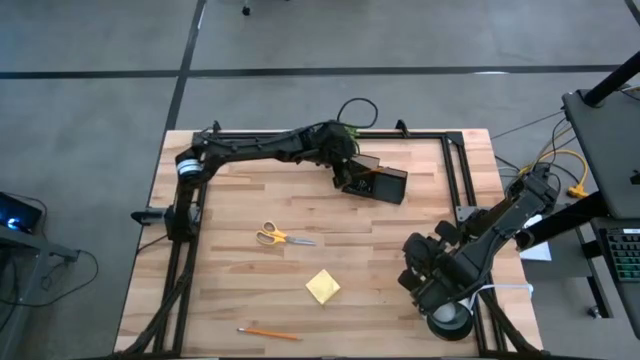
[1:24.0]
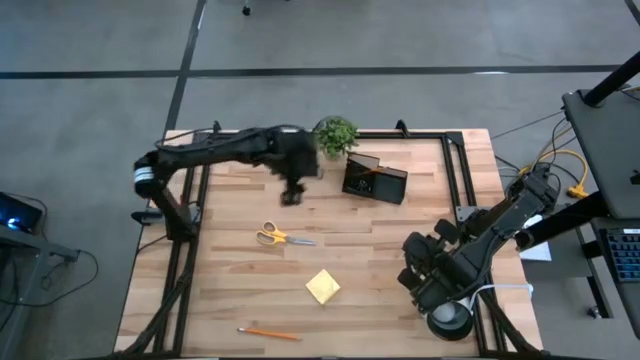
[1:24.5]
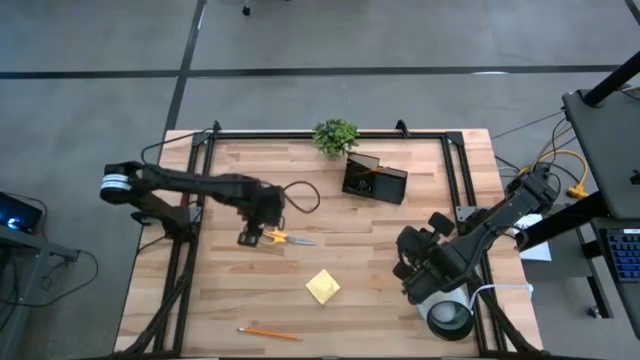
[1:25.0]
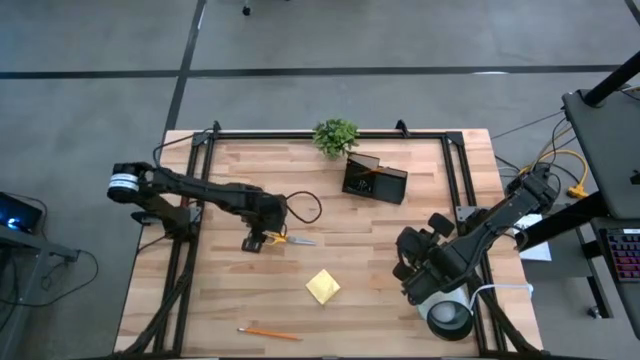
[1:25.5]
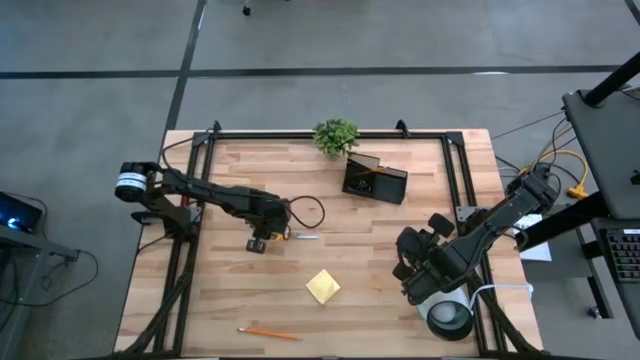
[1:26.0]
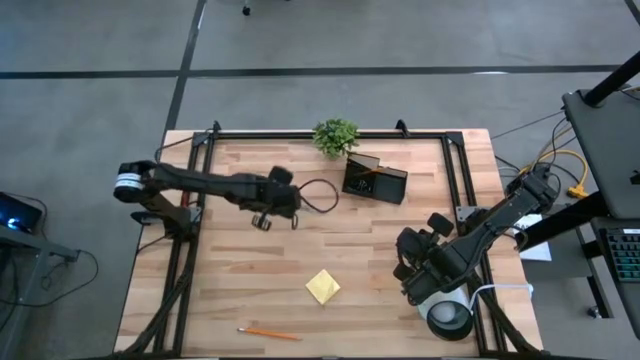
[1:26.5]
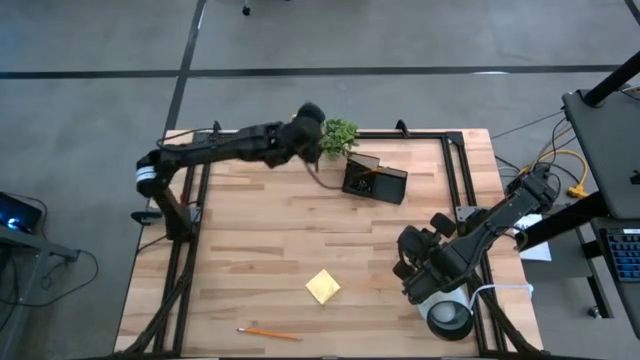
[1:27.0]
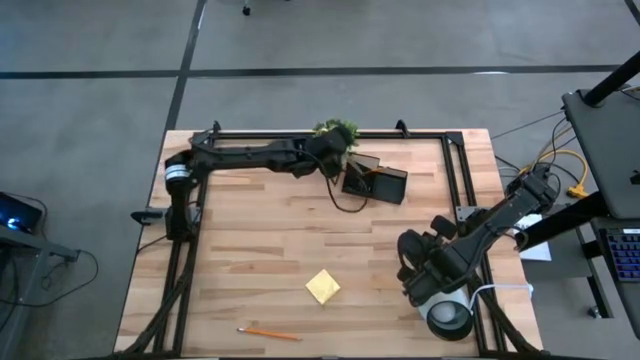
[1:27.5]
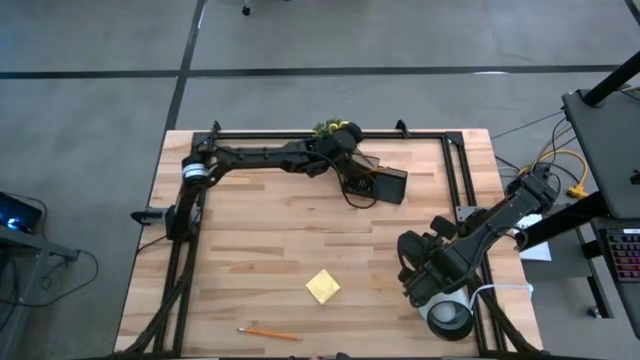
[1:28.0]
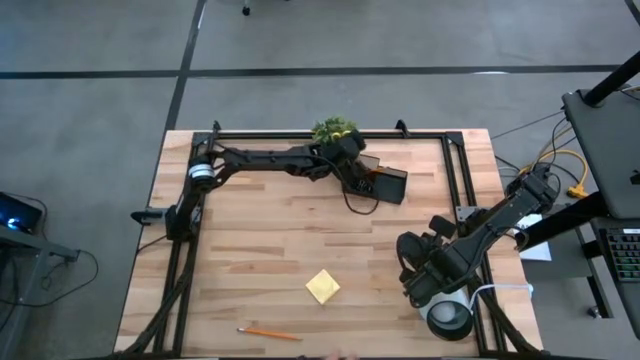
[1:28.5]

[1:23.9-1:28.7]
Task: Pick and place office supplies into organizer
Put the yellow scissors into the desk organizer

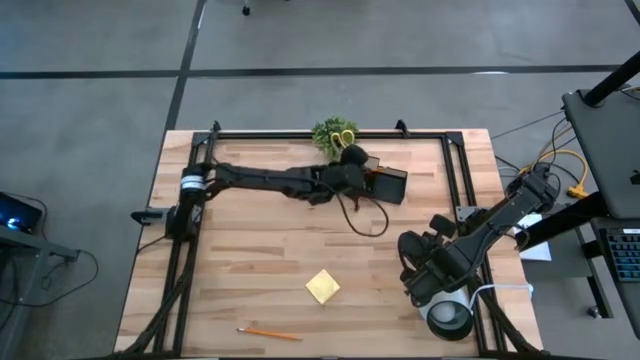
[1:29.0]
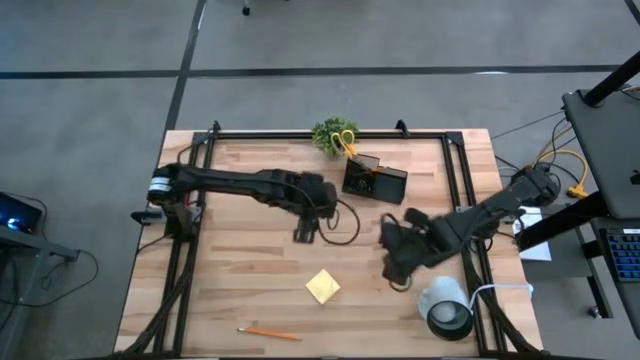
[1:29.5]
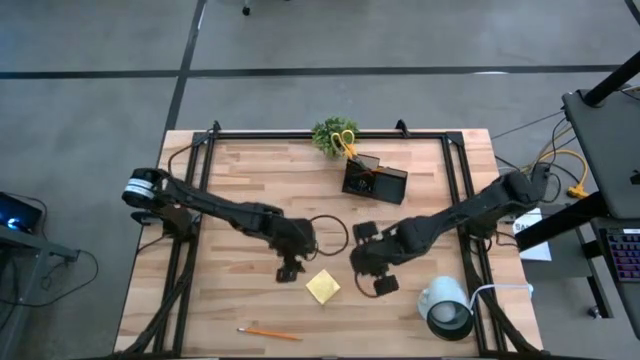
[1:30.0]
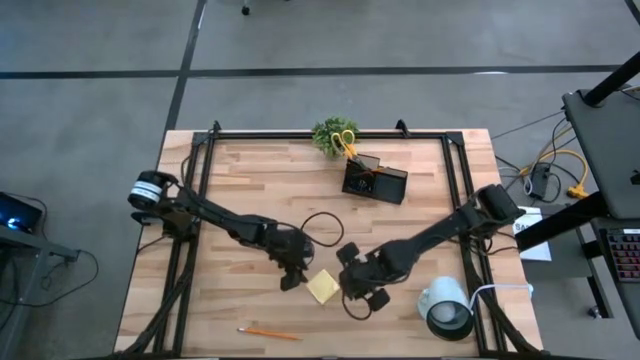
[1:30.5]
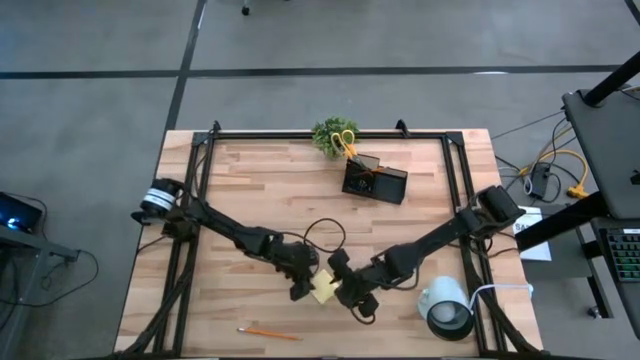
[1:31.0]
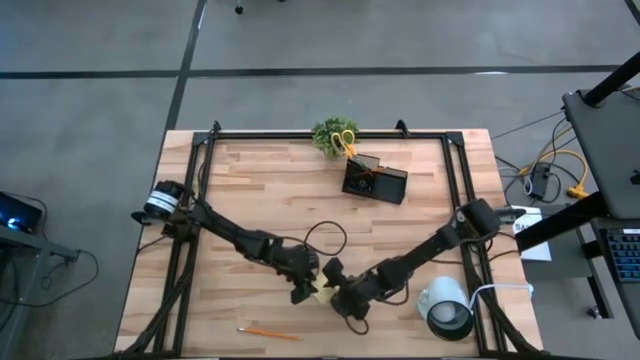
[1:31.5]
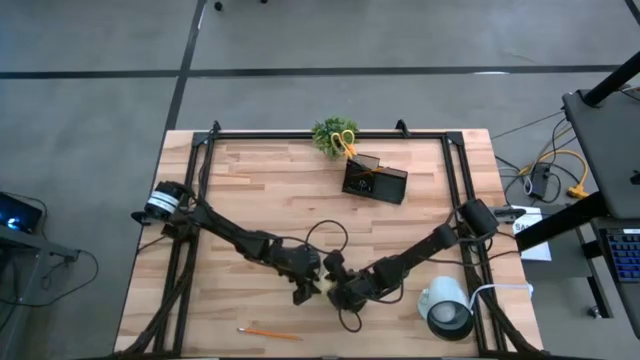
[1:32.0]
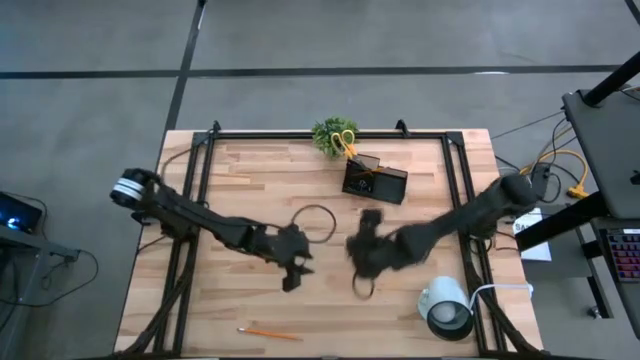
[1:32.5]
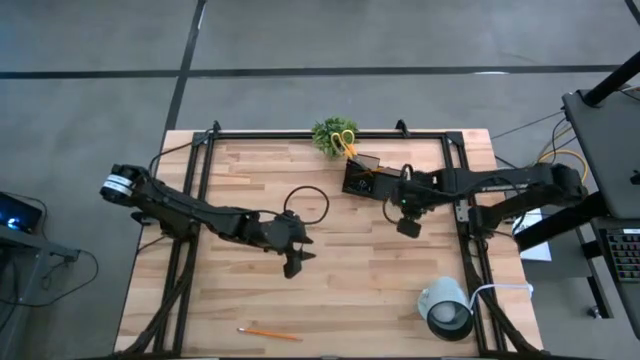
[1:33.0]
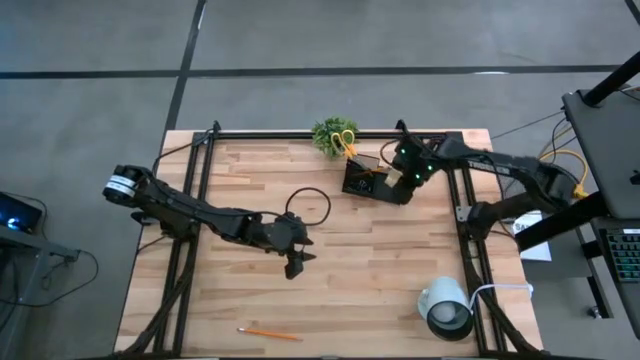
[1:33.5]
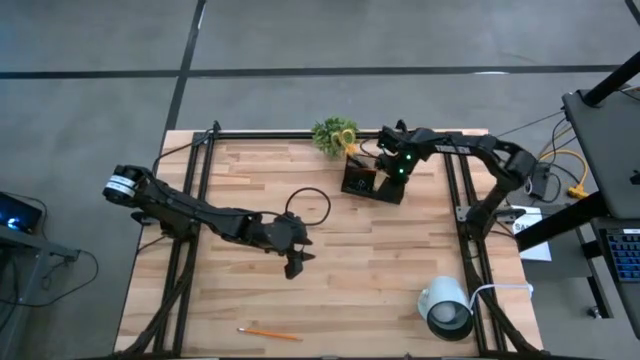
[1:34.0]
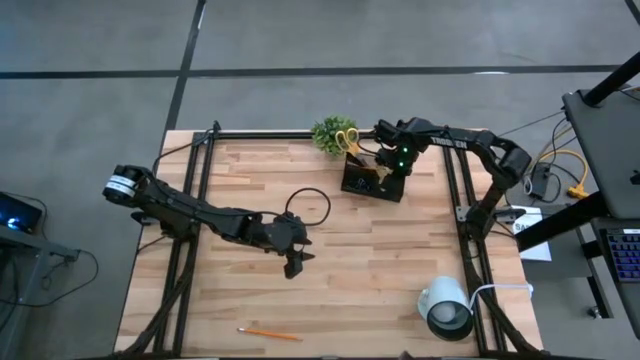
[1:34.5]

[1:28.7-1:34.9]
Put the yellow sticky note into the desk organizer

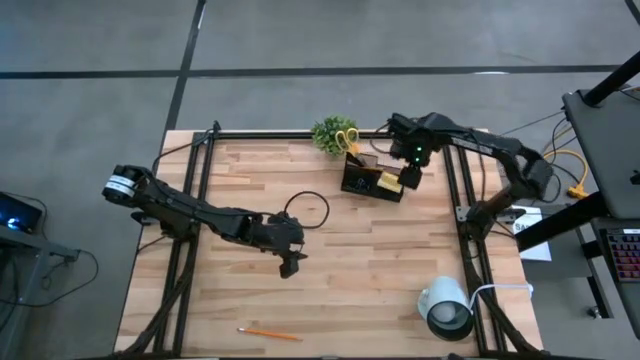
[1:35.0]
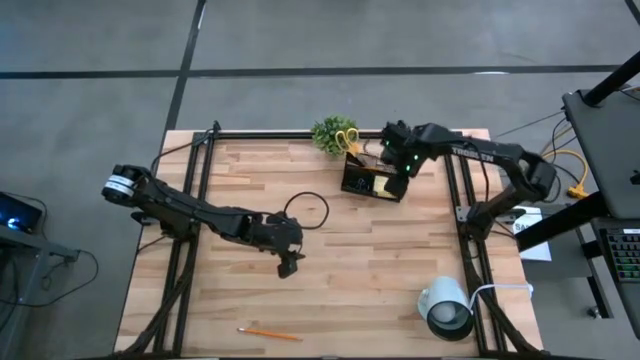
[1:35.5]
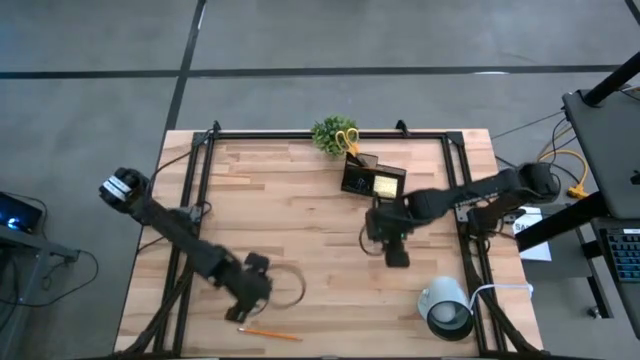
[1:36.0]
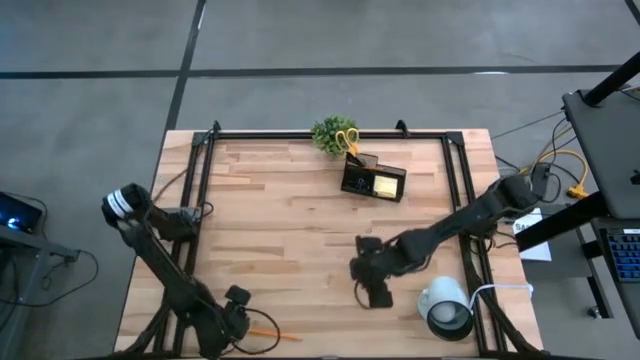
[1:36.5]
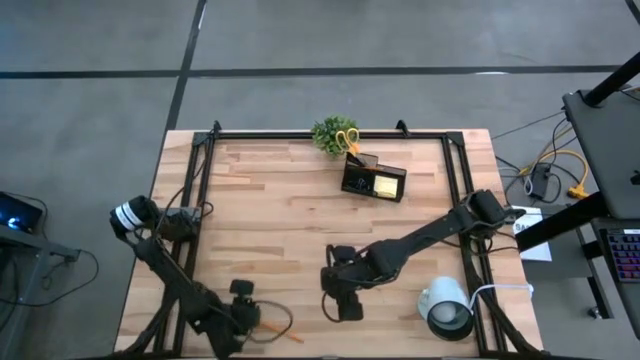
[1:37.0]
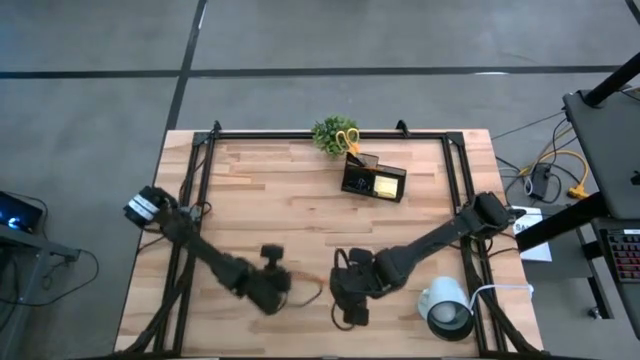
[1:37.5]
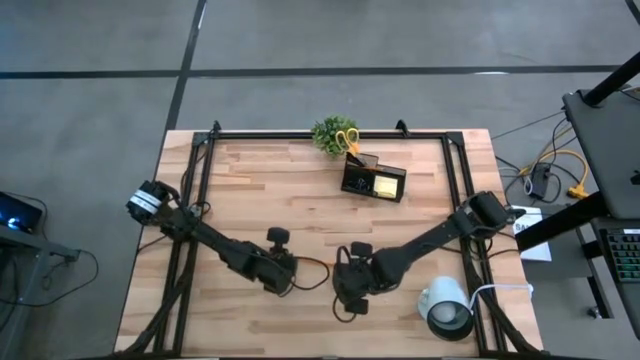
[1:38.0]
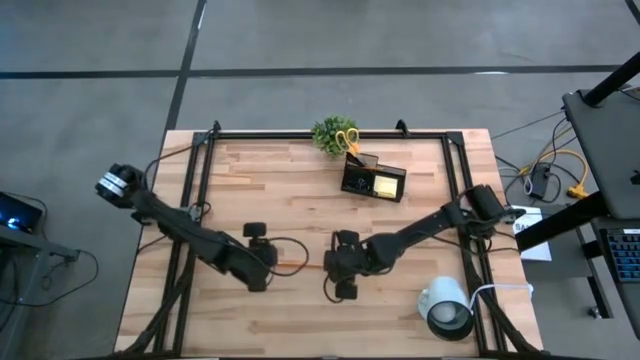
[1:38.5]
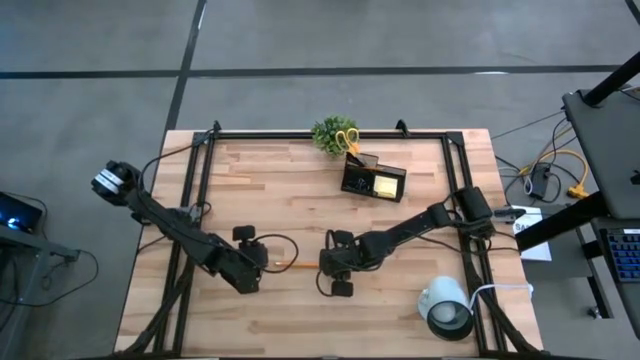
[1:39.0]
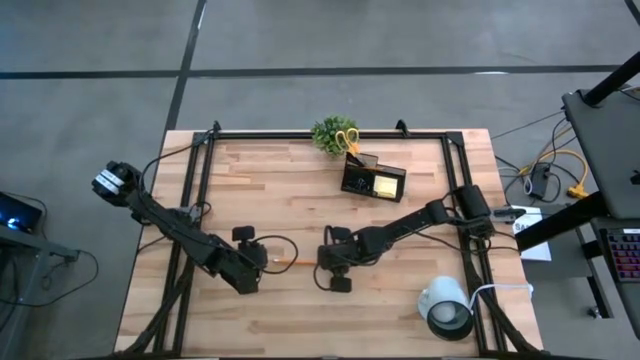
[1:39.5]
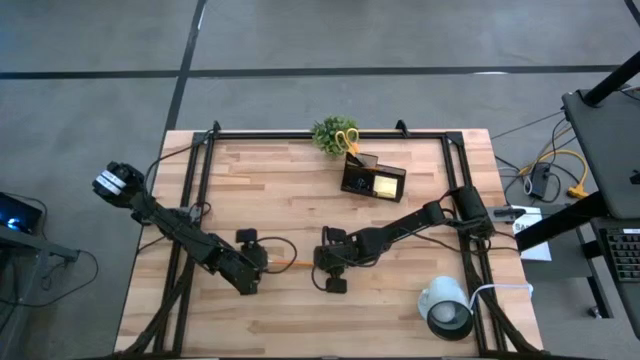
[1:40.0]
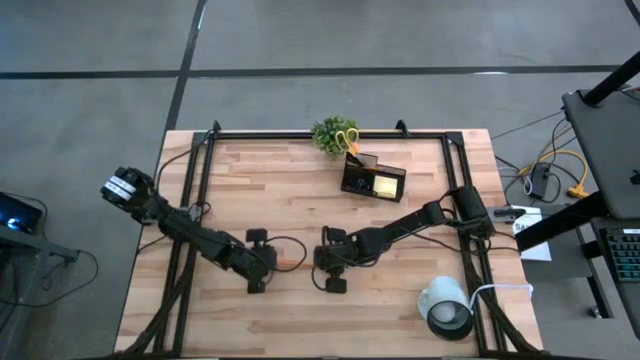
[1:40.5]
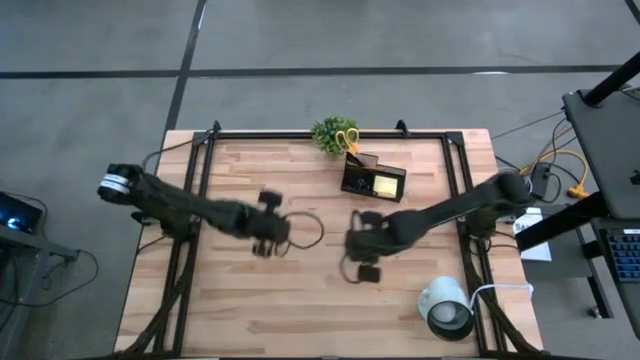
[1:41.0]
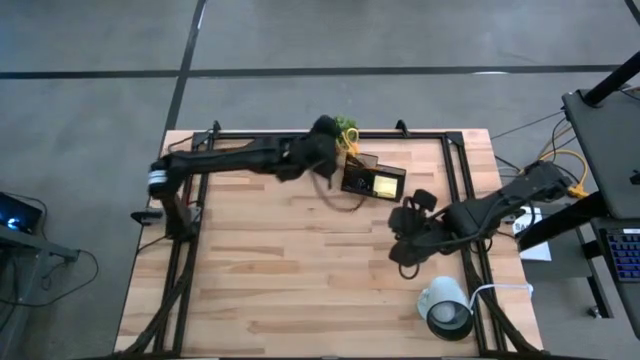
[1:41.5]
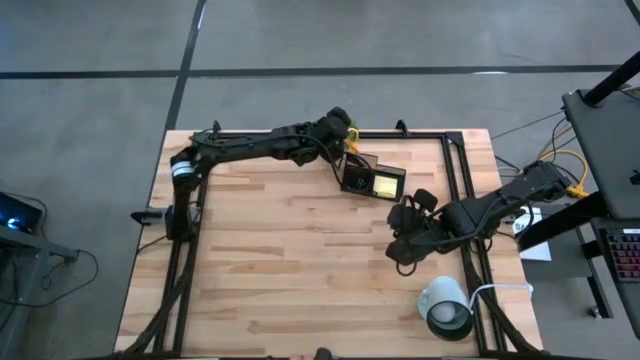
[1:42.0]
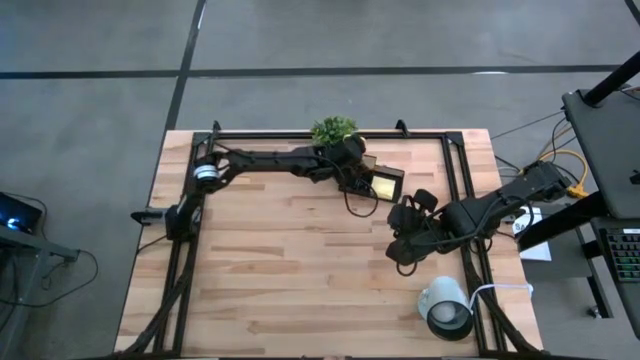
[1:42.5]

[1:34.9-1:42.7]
Put the orange pencil into the desk organizer

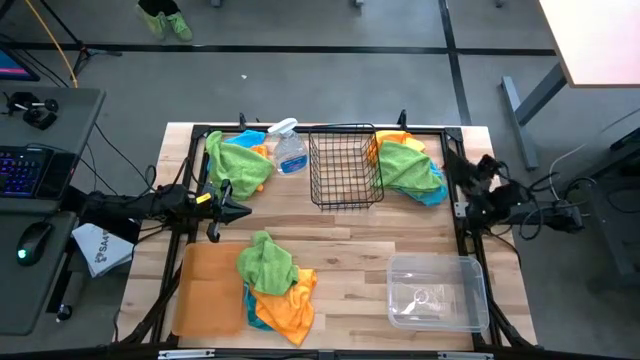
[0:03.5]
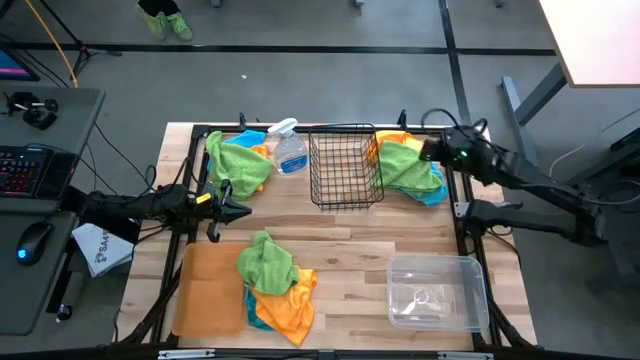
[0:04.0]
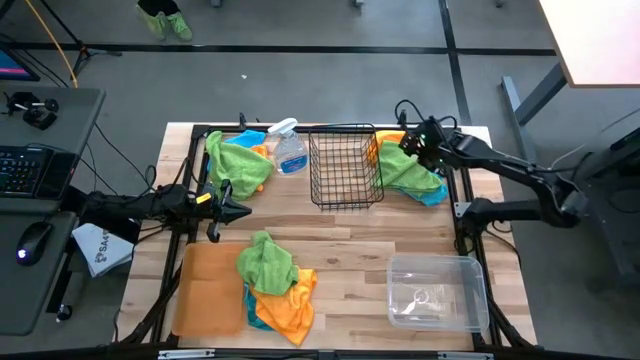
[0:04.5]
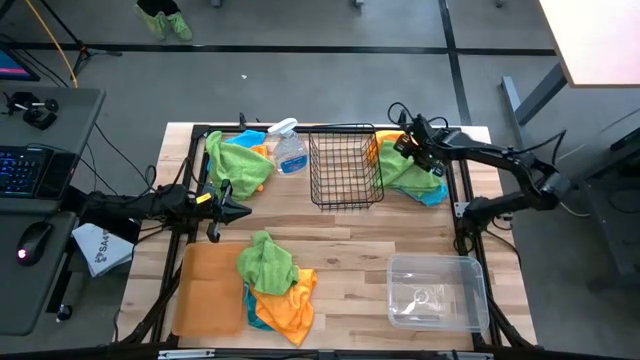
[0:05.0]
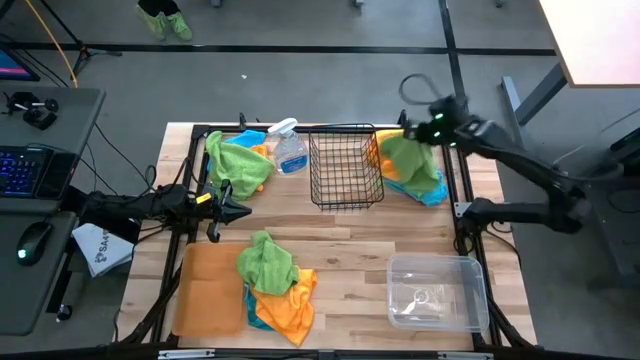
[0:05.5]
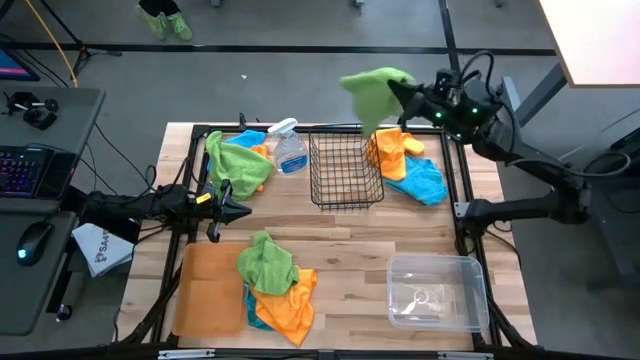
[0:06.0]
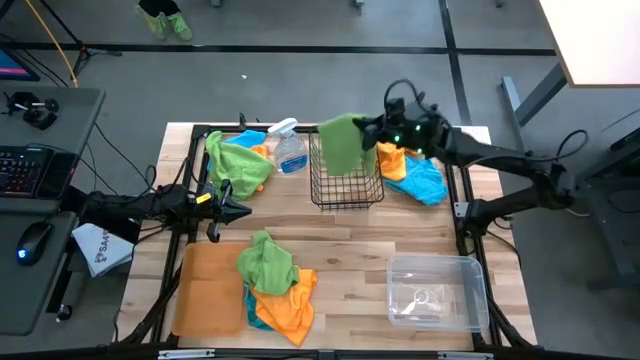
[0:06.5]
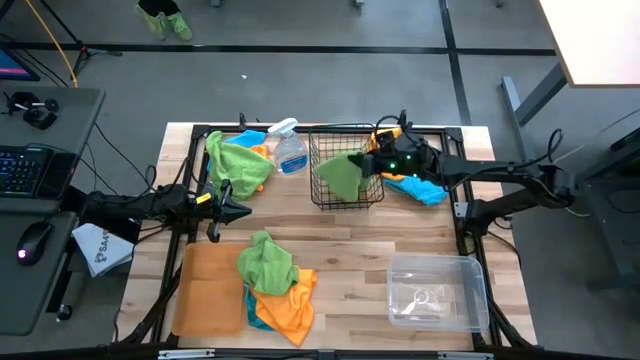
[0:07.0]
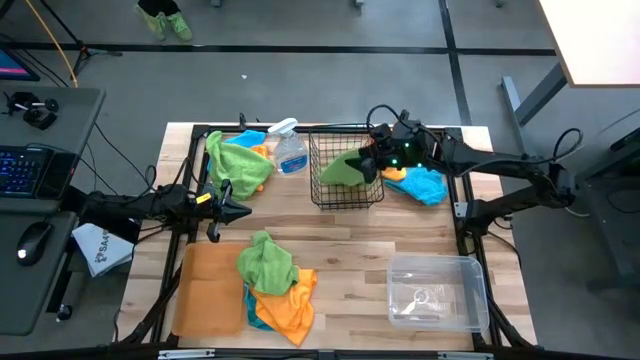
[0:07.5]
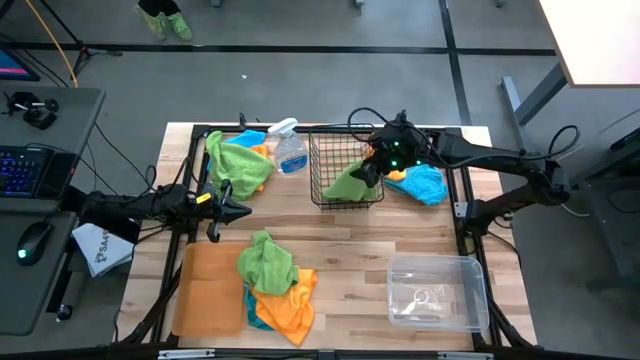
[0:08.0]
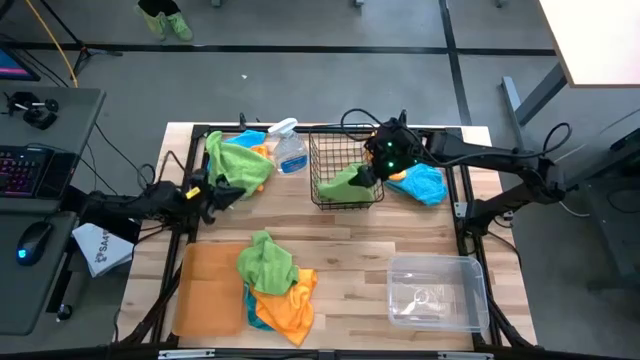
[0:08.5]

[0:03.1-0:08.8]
Task: Sort microfiber towel by color & place in baskets
Put the top right green towel into the black wire basket
